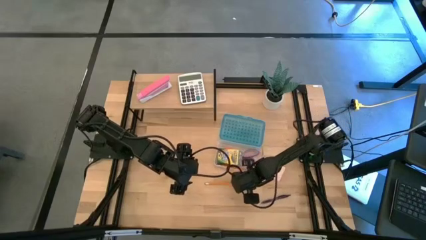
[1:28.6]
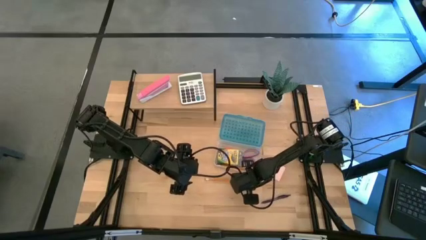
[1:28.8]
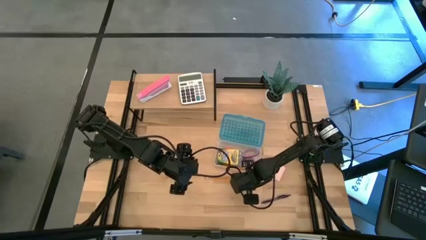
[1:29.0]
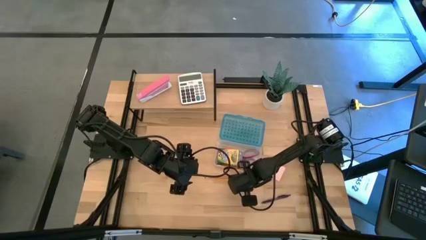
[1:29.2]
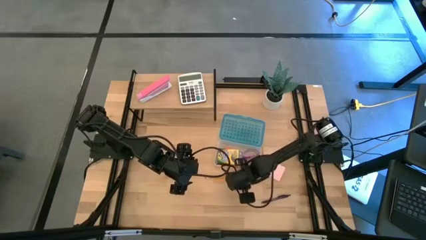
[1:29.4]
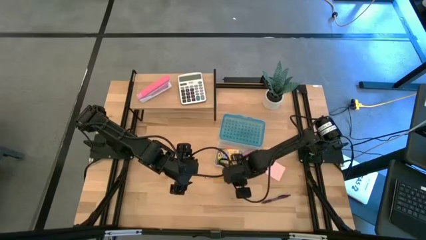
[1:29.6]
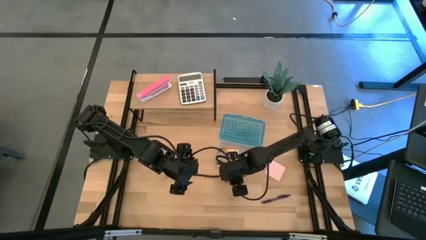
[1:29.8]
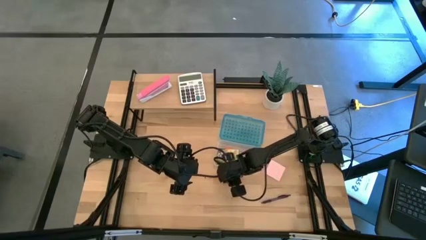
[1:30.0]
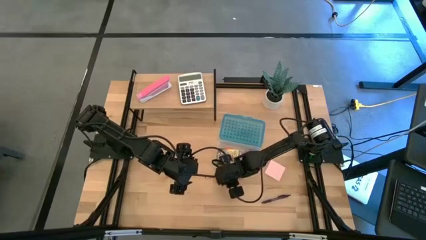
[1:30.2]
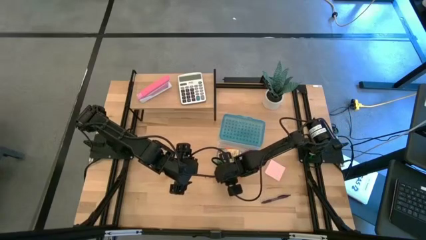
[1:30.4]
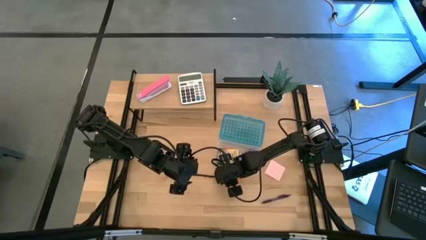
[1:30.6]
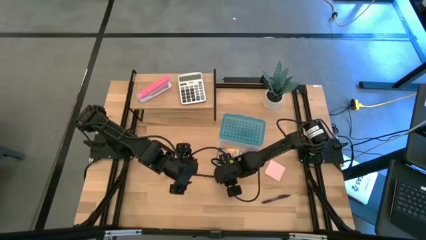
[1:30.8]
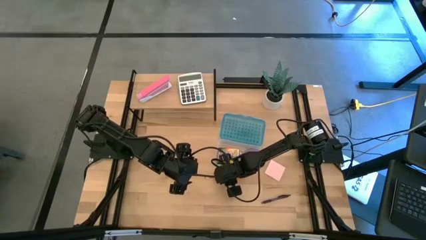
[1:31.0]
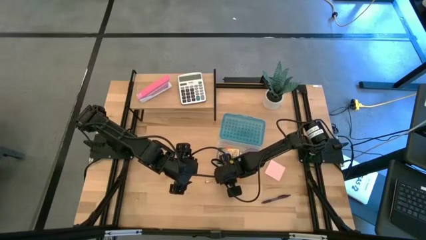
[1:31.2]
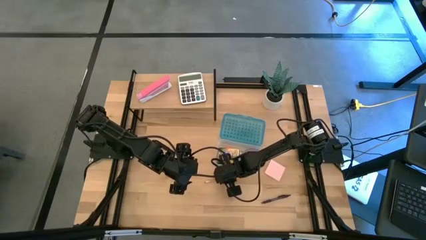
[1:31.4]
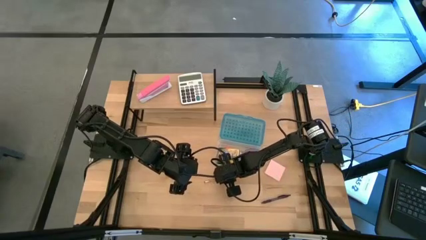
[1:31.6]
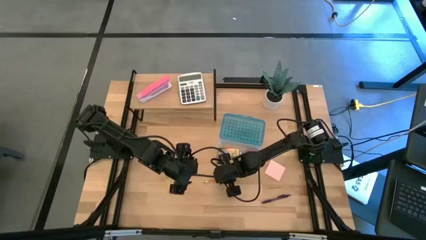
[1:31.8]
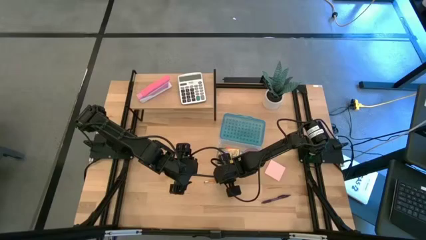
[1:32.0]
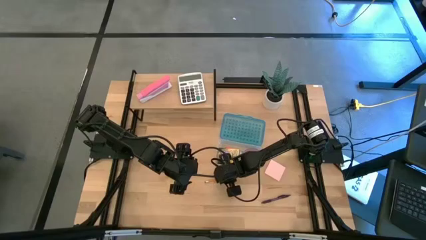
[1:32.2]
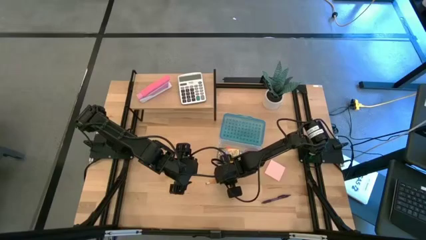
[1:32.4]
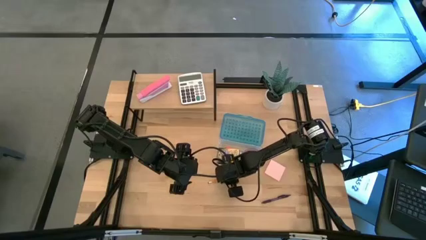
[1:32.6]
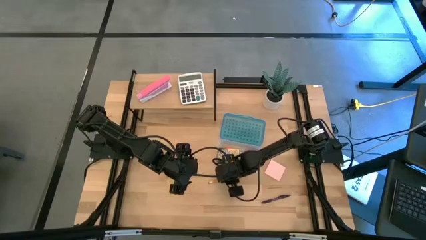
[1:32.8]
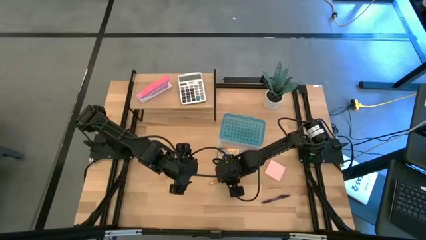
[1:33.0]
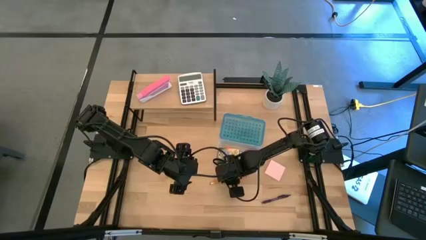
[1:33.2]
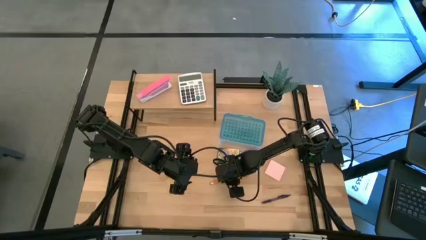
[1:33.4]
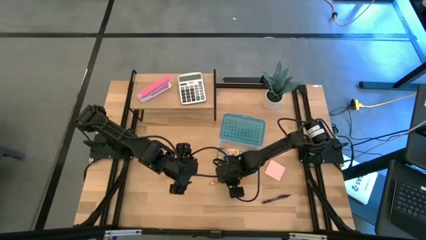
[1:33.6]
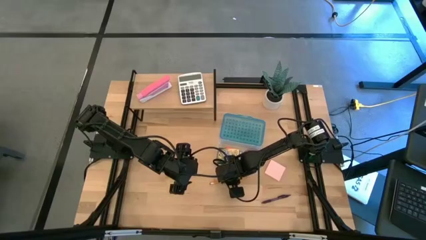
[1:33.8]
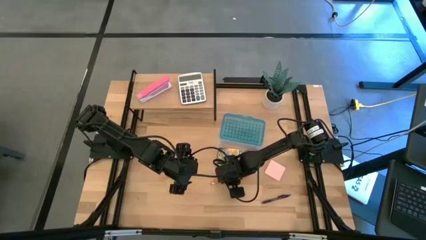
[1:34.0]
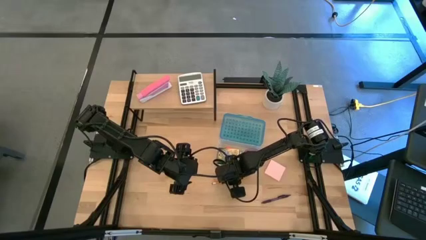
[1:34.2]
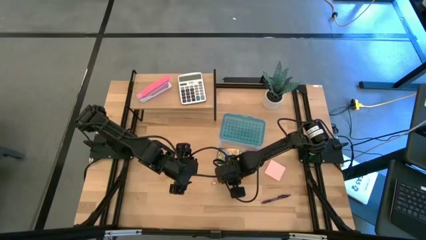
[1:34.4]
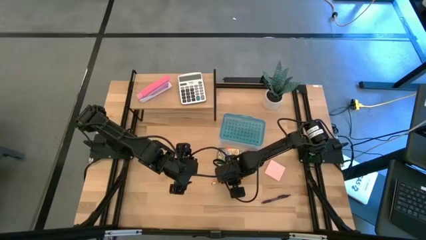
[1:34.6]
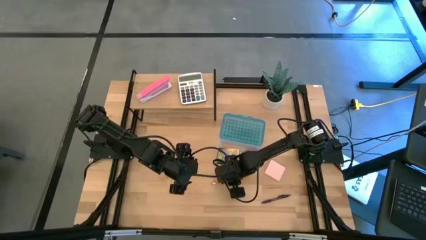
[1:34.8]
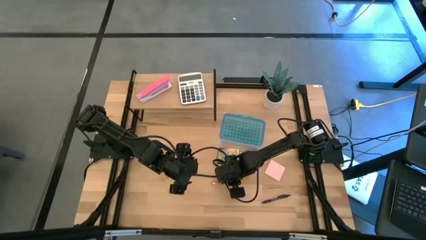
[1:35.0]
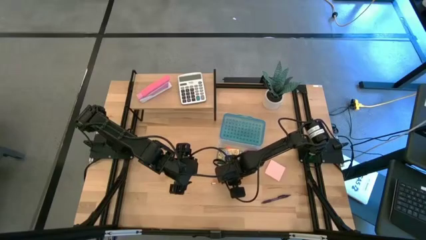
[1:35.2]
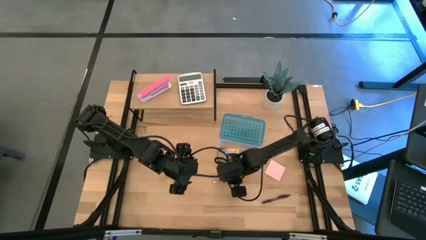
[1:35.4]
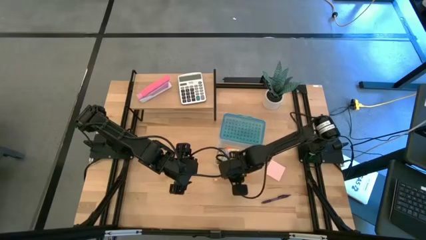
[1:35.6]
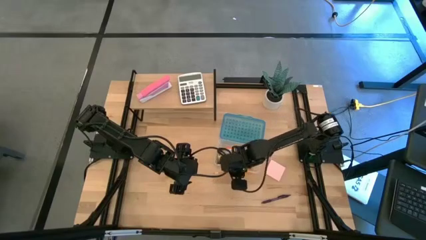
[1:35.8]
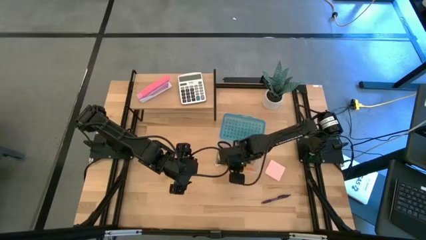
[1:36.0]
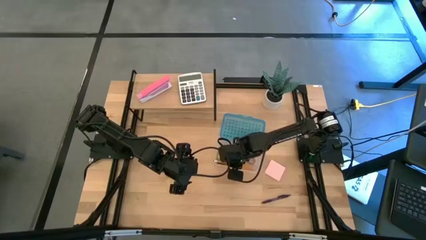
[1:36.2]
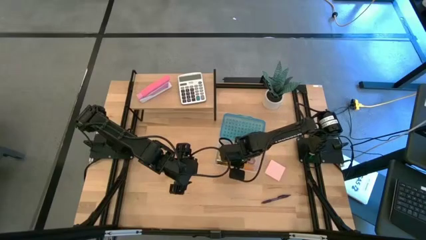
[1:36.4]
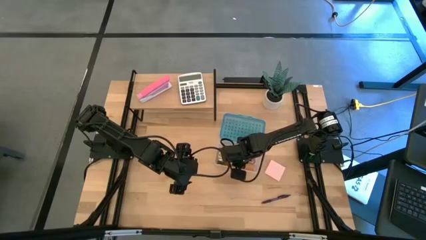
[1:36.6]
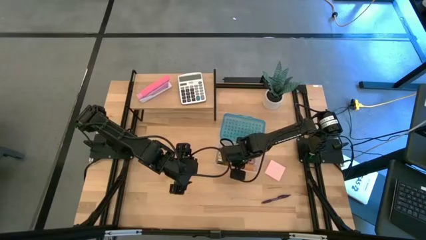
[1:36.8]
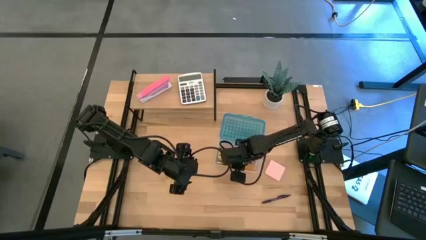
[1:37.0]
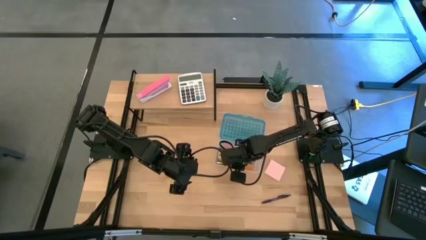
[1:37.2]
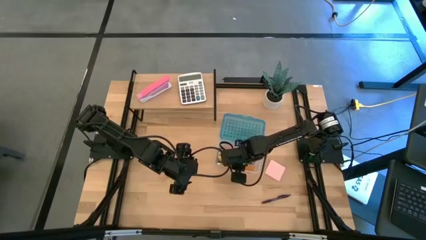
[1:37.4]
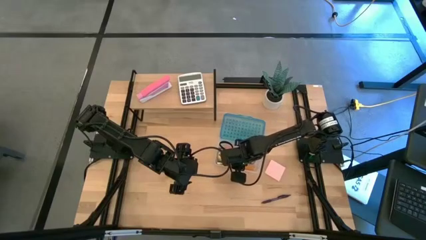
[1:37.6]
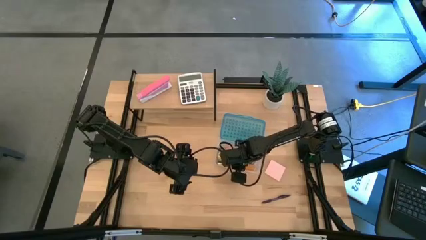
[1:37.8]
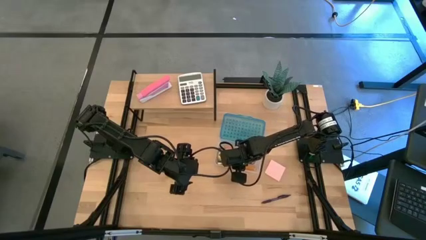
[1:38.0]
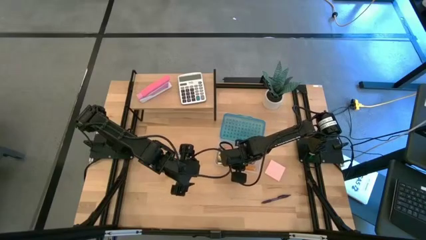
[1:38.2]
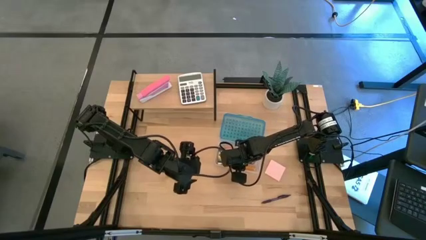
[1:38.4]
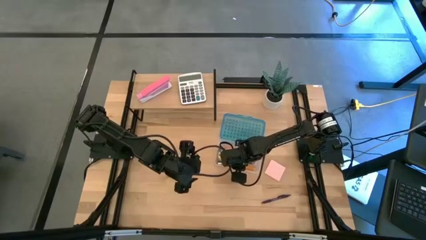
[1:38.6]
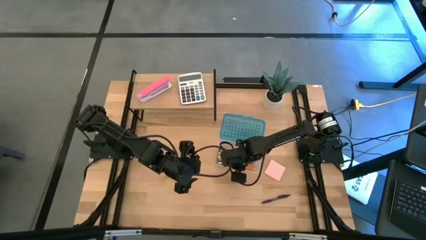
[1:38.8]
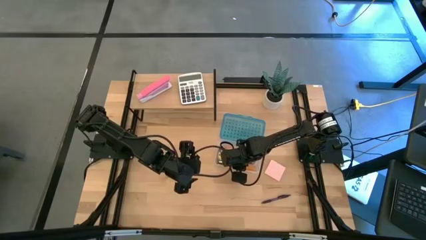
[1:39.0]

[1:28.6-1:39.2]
Task: Pack school essentials
Put the pencil into the supply box

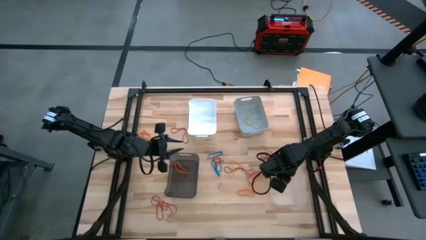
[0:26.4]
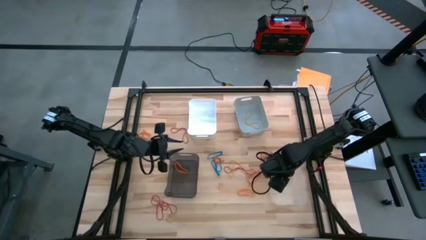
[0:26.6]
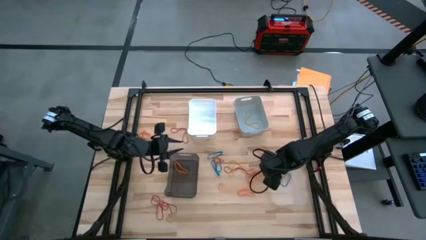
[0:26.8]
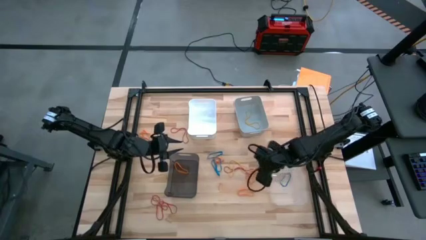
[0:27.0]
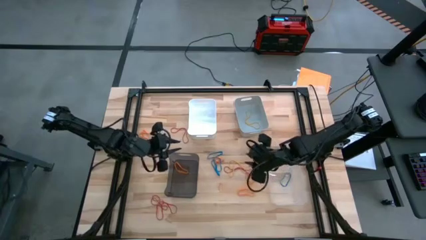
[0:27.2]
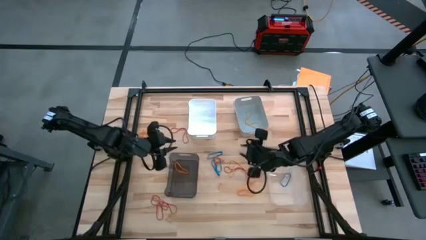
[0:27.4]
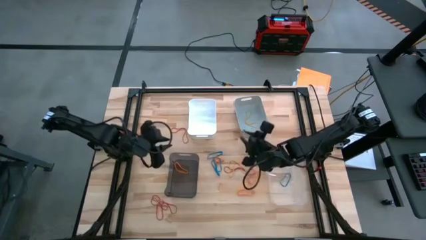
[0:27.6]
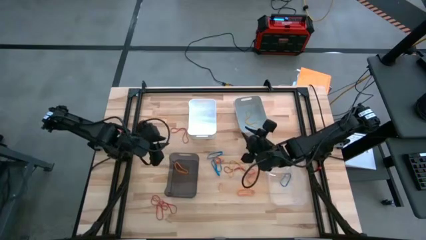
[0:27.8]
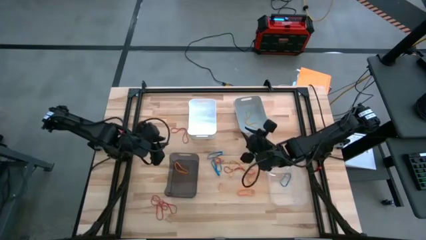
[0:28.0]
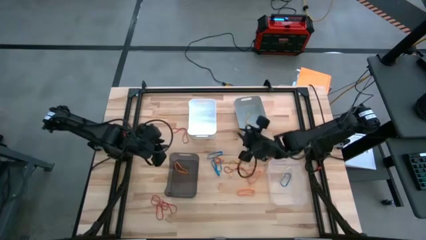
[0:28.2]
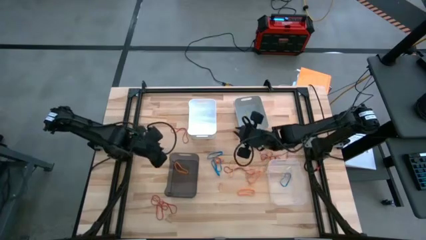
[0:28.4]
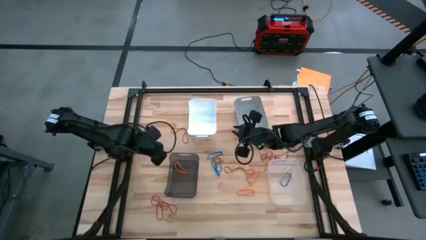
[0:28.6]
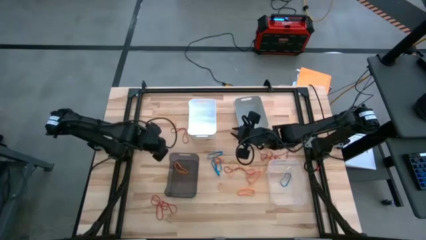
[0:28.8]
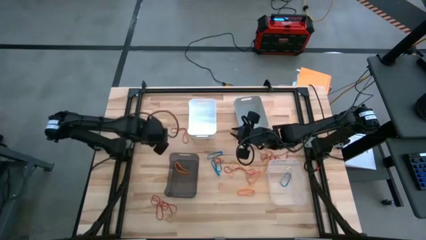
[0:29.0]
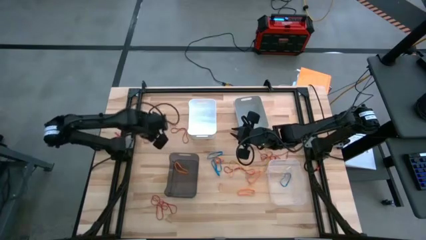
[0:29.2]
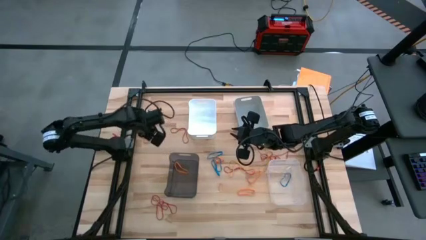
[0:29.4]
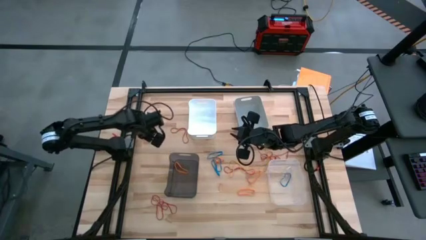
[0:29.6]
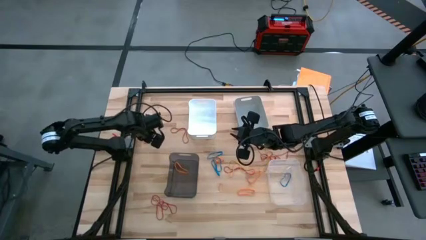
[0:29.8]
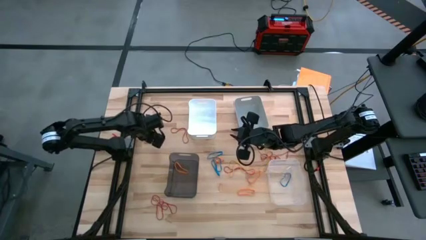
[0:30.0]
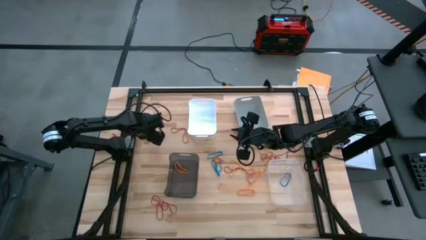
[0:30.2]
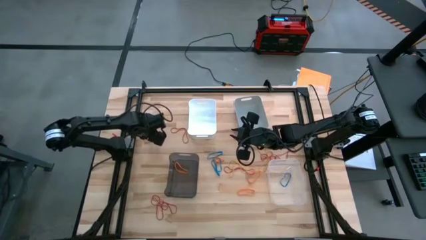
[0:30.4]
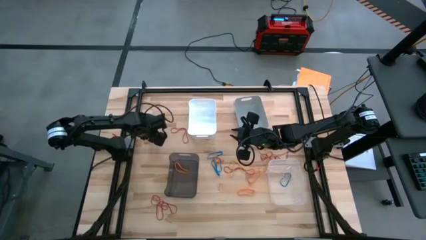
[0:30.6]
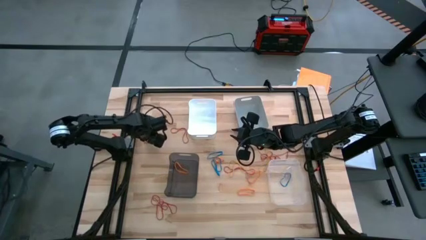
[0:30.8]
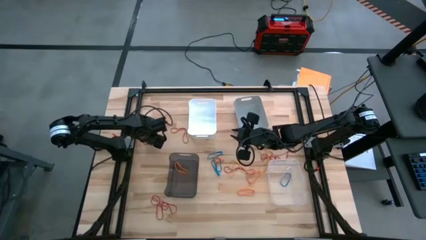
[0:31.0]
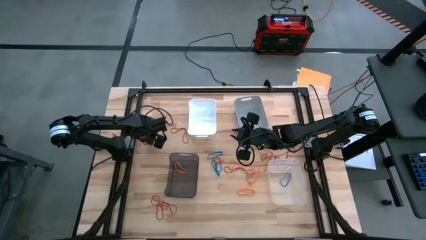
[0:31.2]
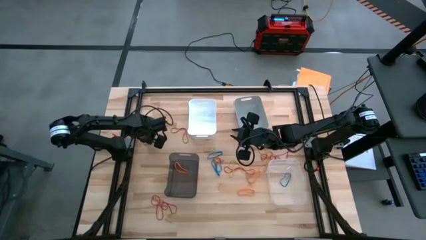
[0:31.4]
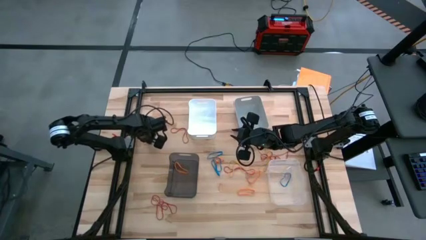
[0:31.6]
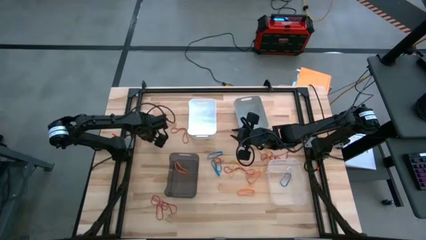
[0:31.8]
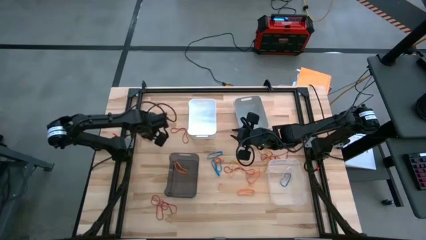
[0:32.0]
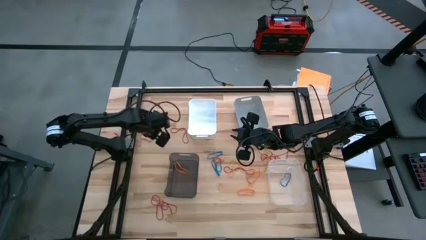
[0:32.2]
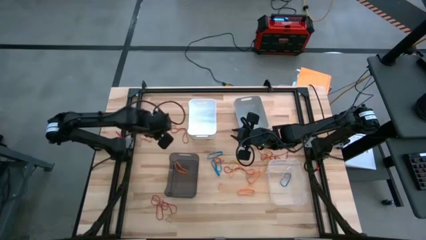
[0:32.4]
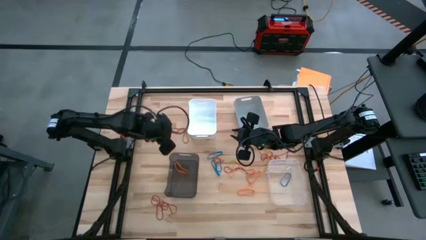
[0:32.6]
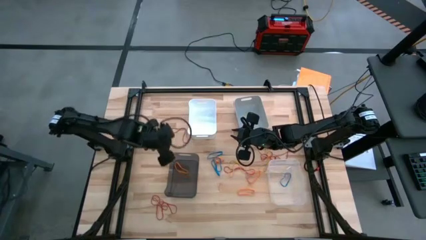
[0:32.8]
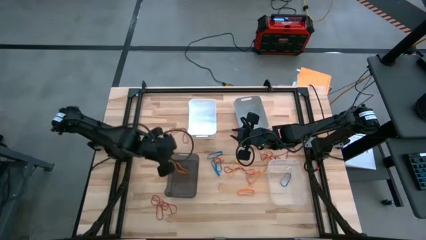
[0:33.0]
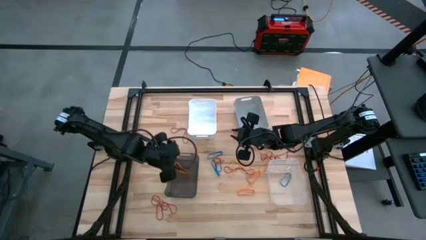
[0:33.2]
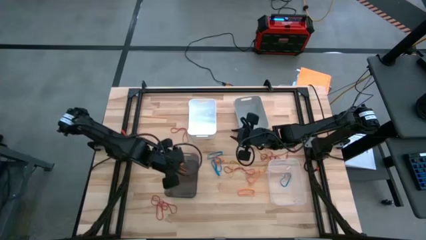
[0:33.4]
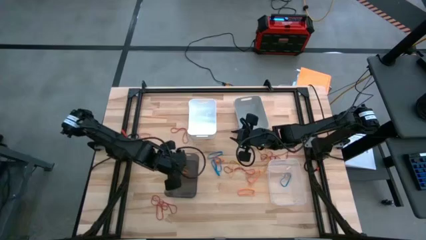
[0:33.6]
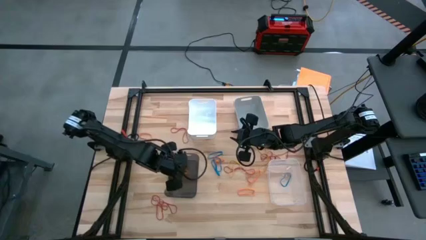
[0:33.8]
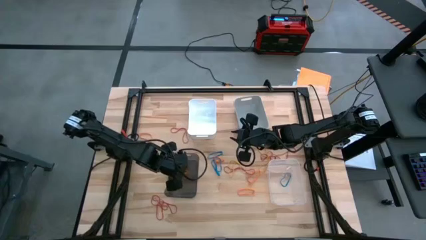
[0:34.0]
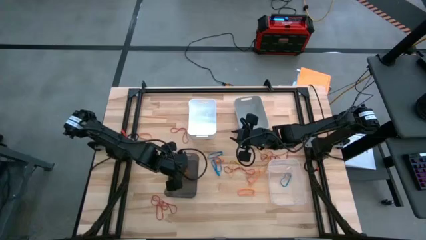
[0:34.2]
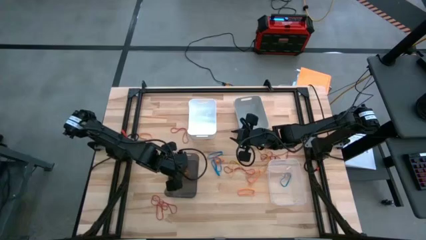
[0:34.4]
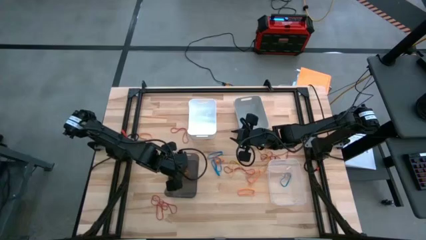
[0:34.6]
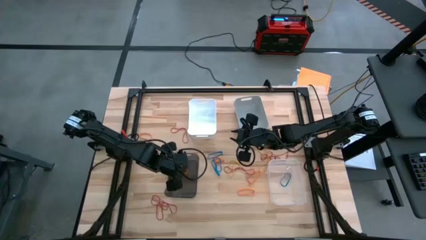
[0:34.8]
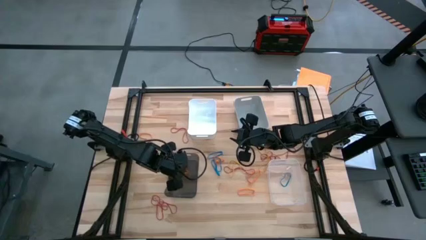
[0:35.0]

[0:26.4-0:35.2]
Task: Sort rubber bands into baskets
Put the orange rubber band into the black bin
